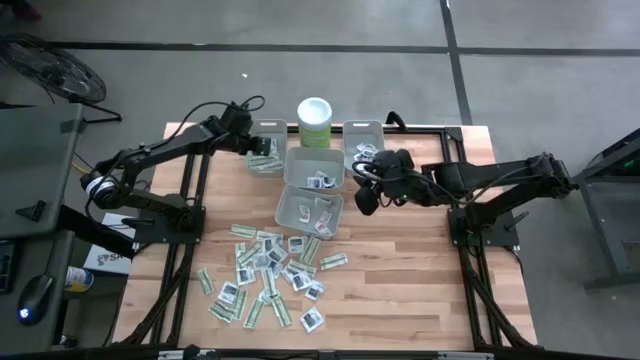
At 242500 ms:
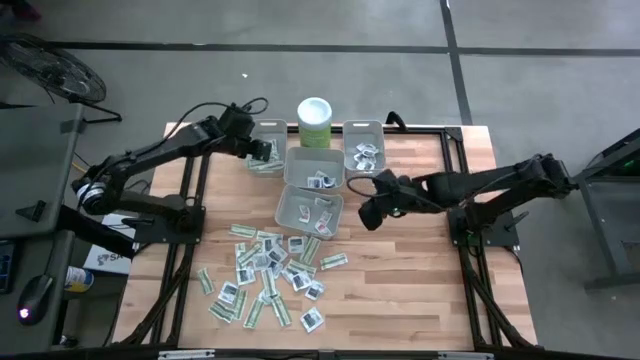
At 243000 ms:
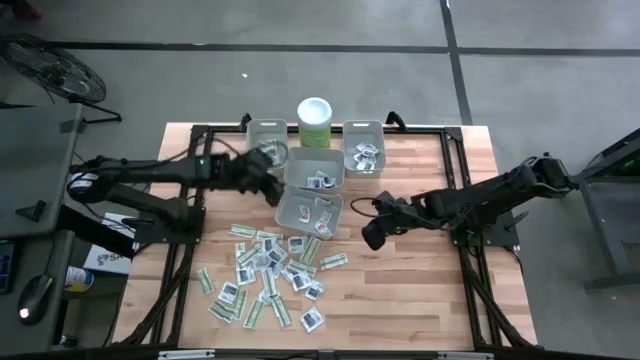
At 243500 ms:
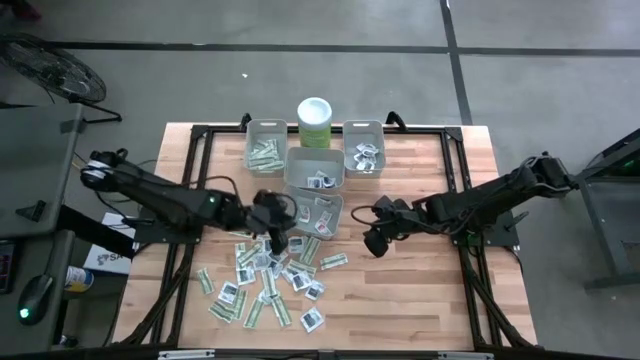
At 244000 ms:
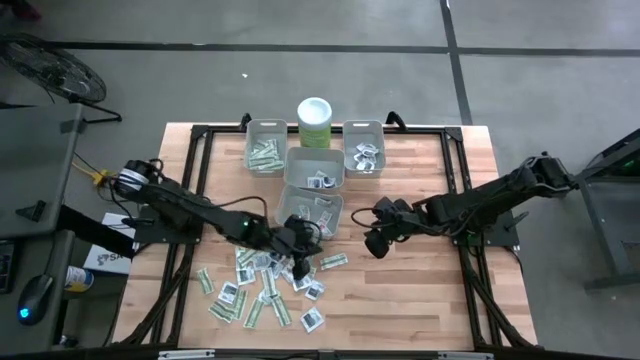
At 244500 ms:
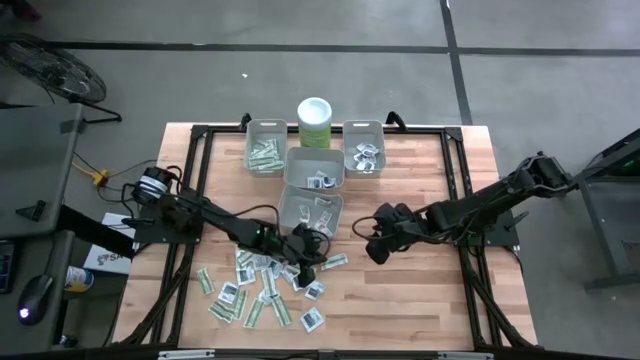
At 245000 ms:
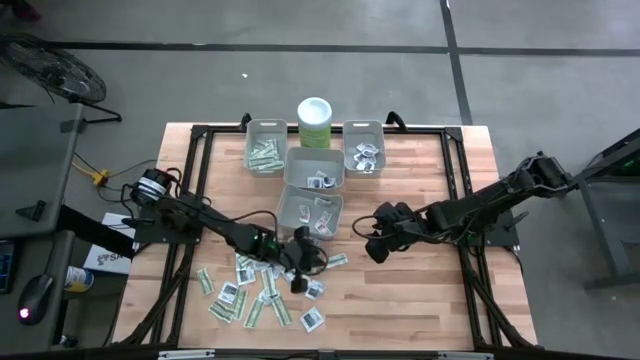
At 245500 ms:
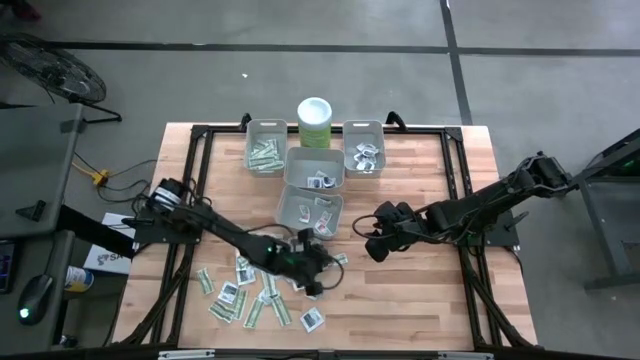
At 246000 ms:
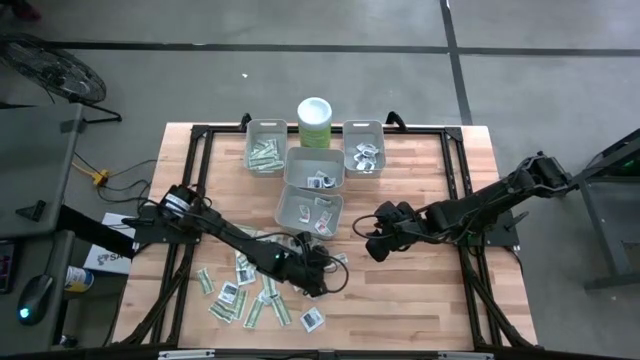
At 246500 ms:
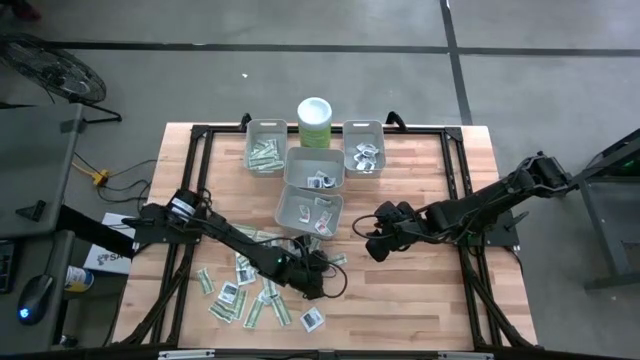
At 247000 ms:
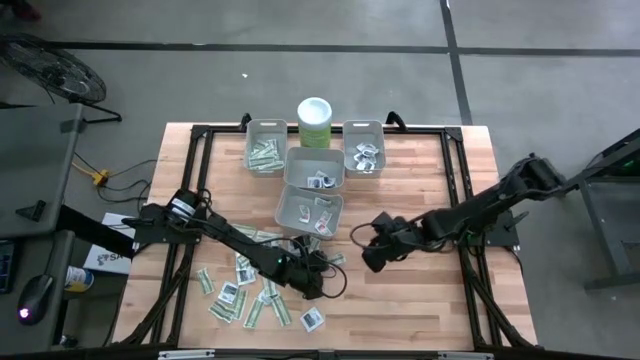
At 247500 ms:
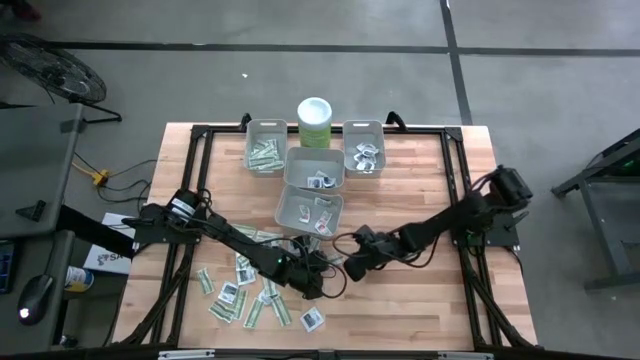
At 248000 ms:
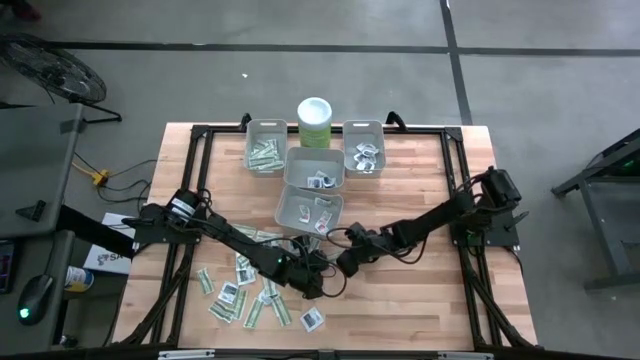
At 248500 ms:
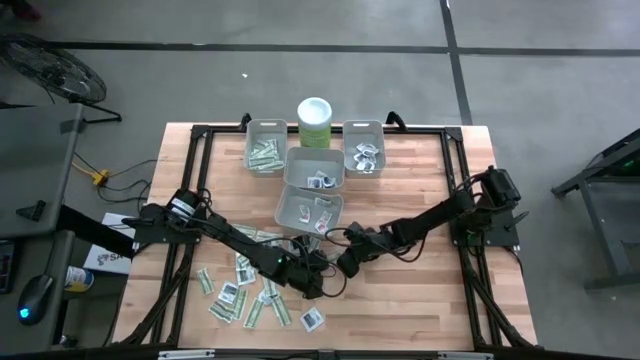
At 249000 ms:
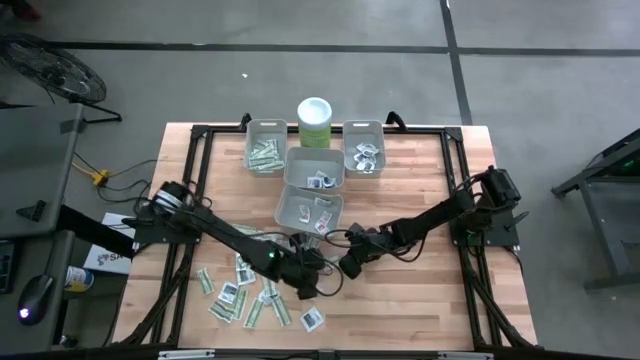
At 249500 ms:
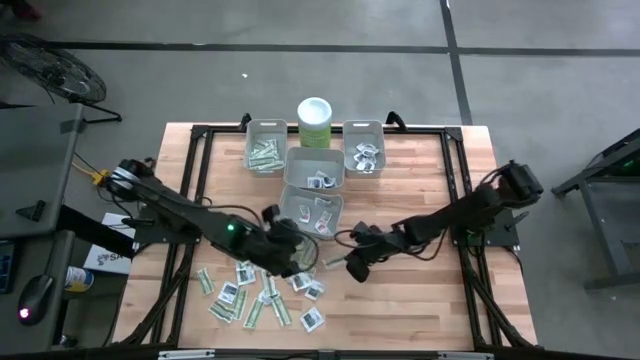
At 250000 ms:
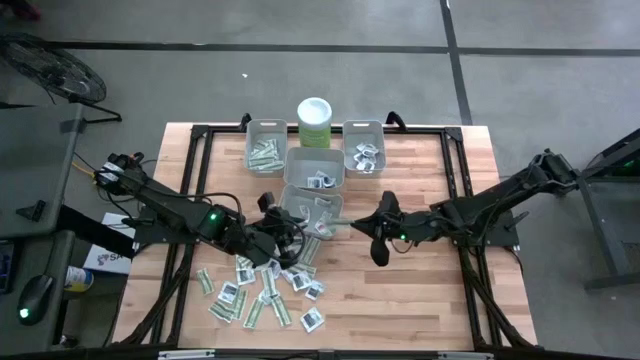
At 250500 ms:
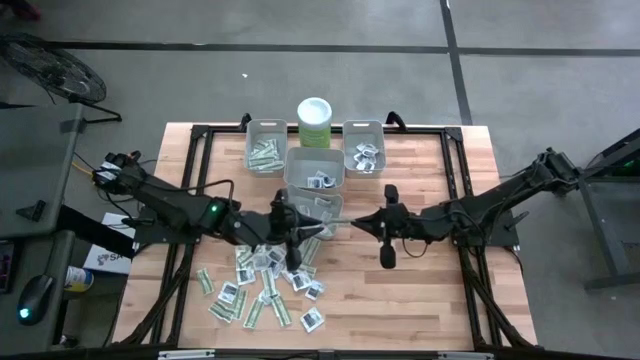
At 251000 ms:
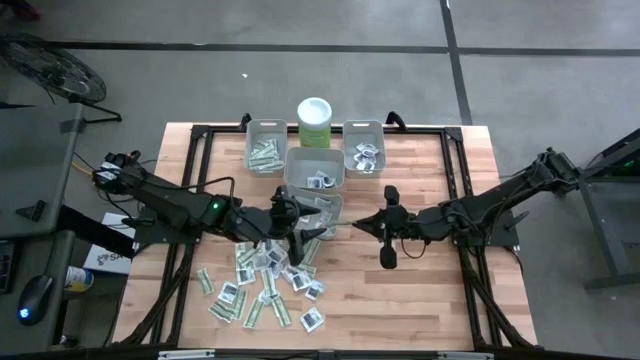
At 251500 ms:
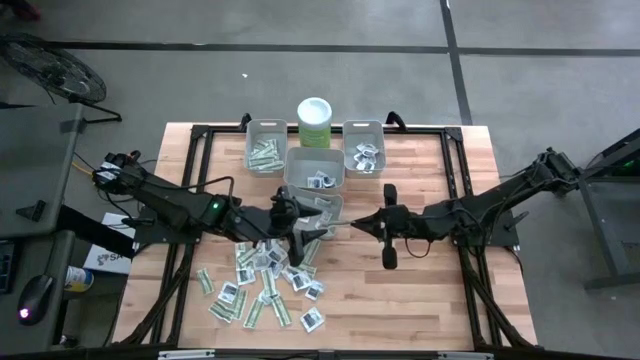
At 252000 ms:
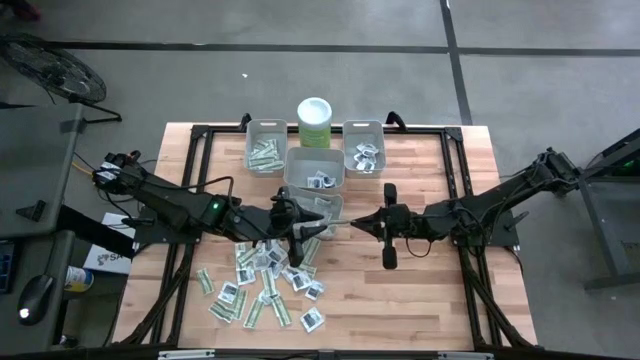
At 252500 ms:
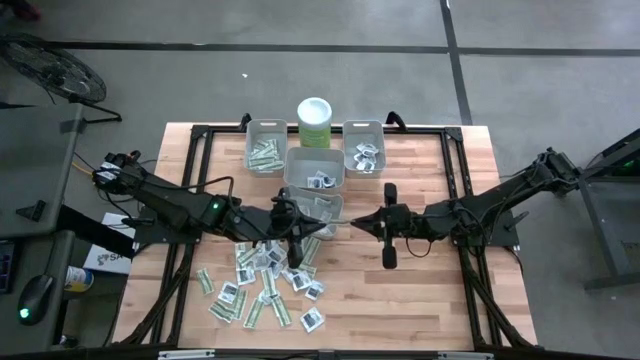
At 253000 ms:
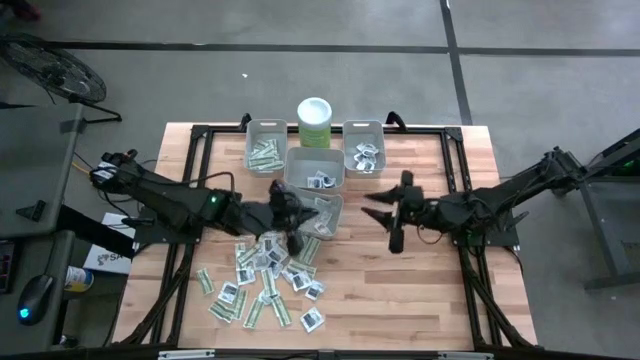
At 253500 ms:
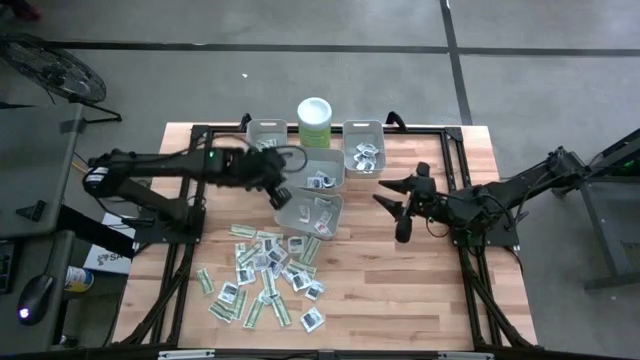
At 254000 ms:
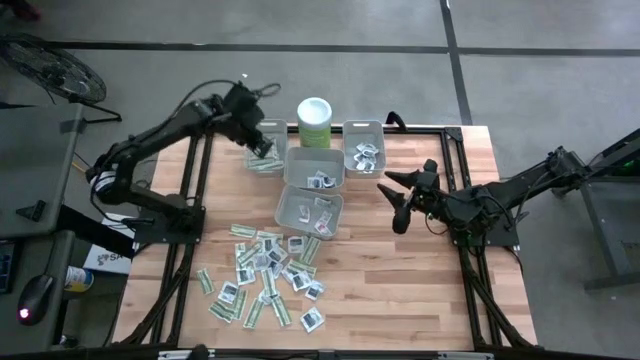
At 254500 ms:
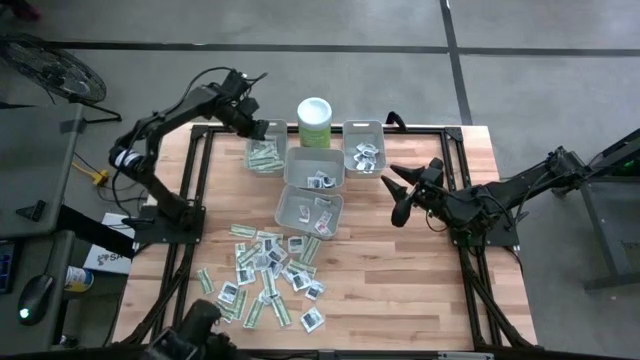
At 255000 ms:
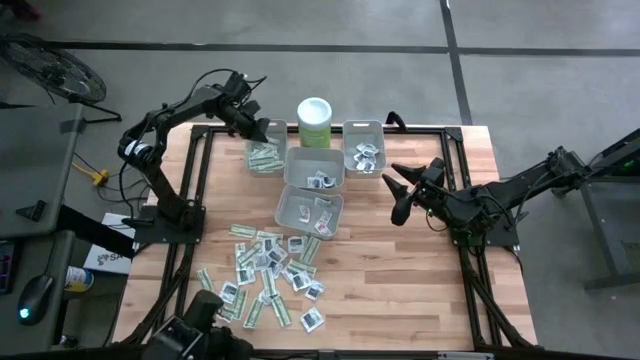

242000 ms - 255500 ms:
Task: Pick & Place First Aid Supplies
Put the bandage pack into the left bin

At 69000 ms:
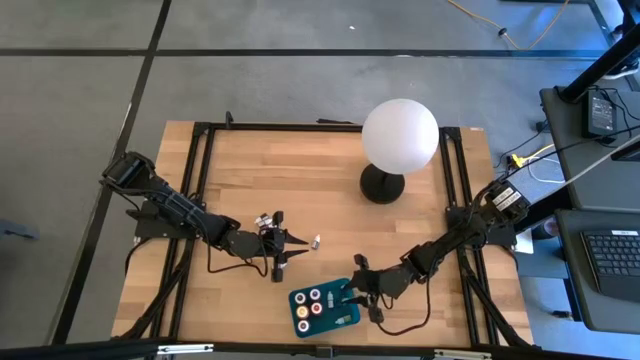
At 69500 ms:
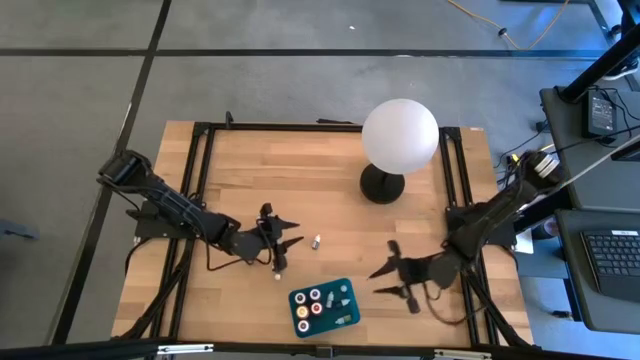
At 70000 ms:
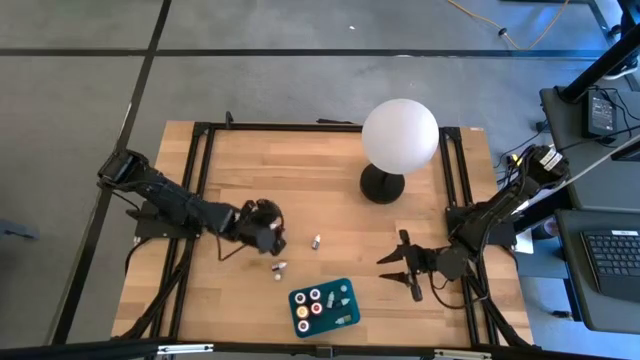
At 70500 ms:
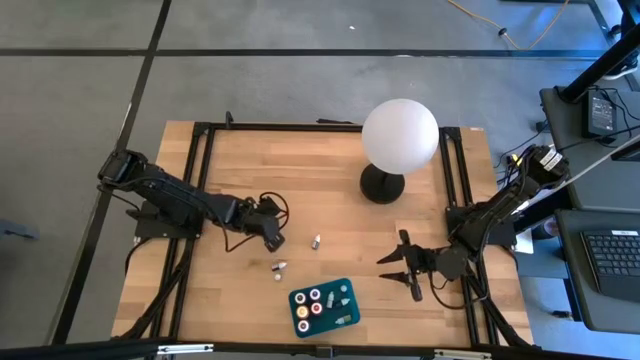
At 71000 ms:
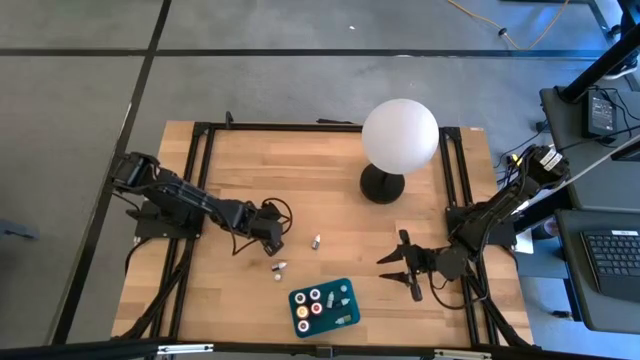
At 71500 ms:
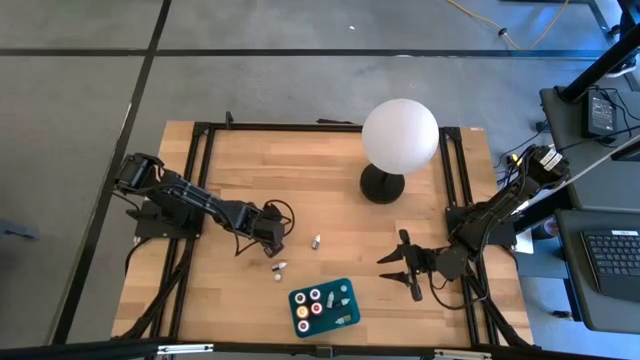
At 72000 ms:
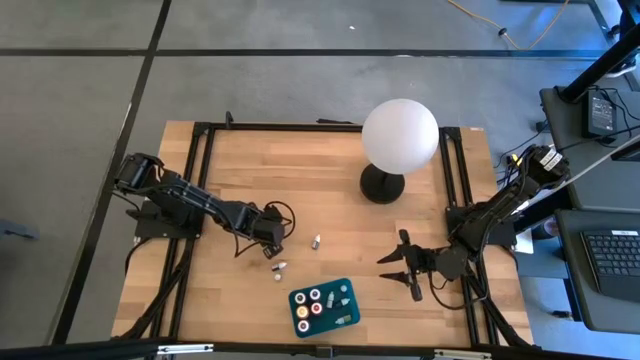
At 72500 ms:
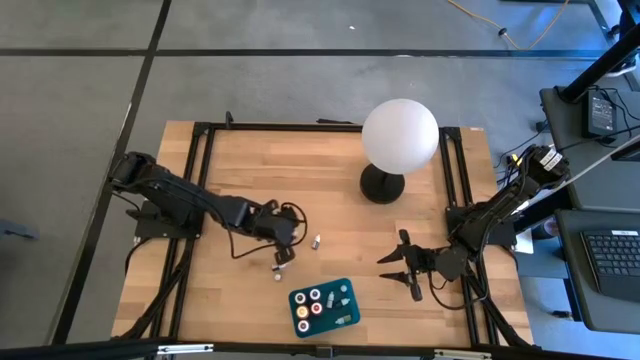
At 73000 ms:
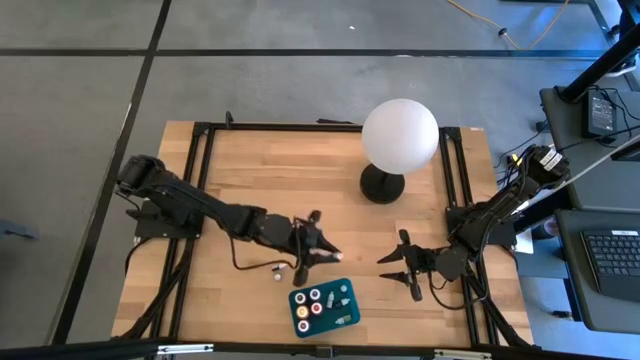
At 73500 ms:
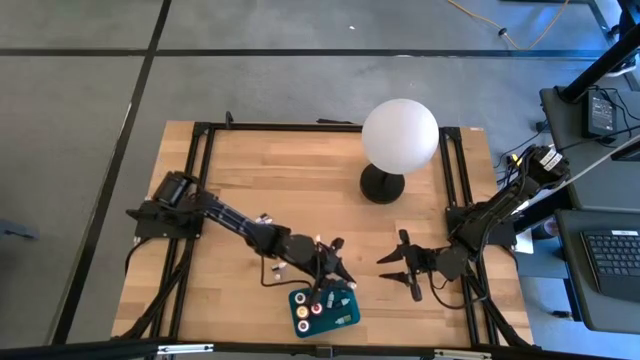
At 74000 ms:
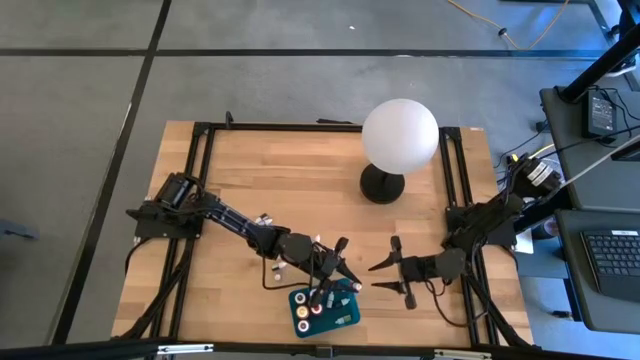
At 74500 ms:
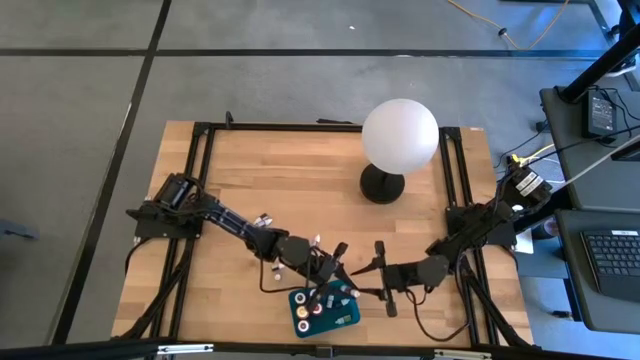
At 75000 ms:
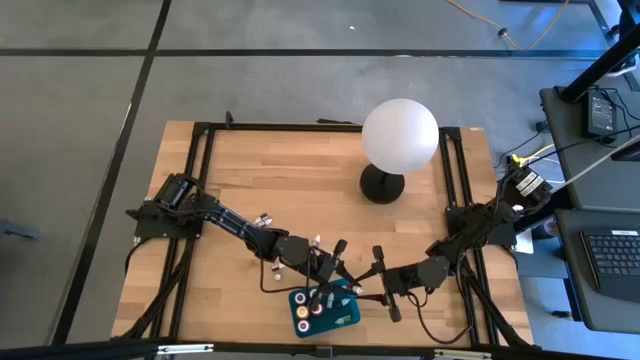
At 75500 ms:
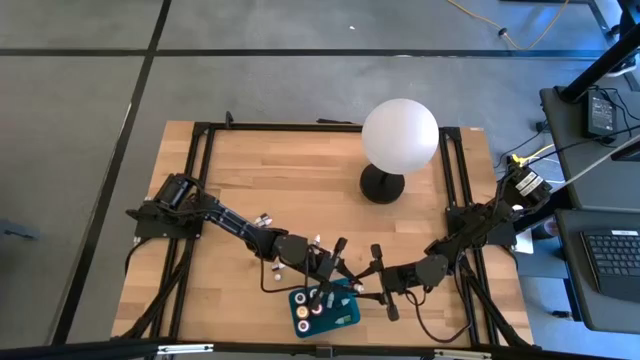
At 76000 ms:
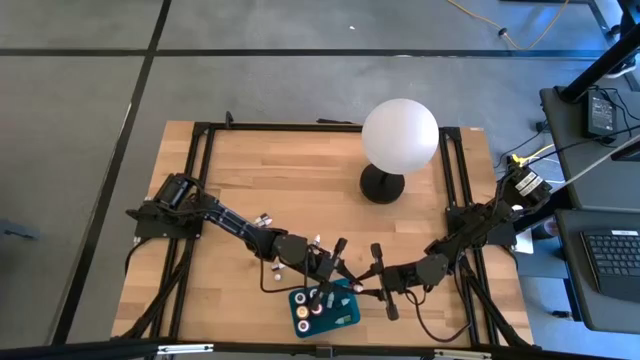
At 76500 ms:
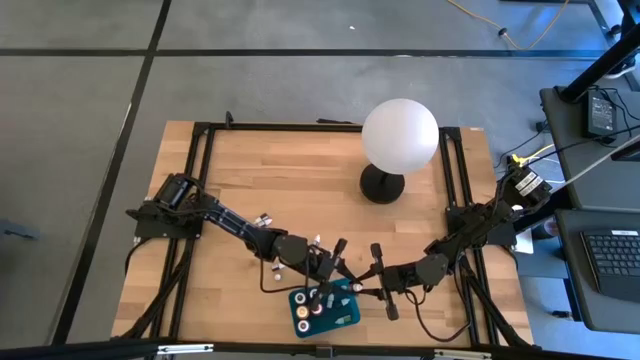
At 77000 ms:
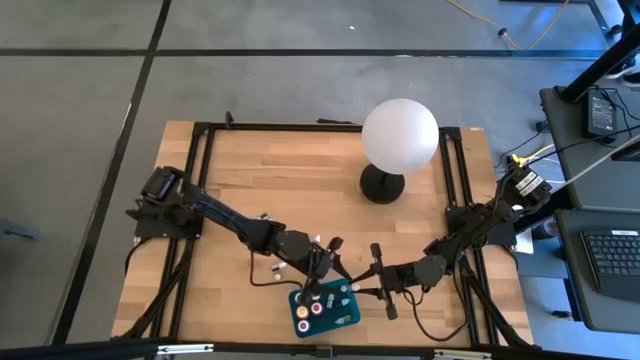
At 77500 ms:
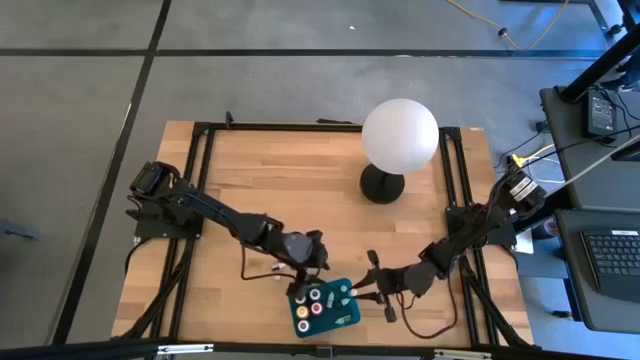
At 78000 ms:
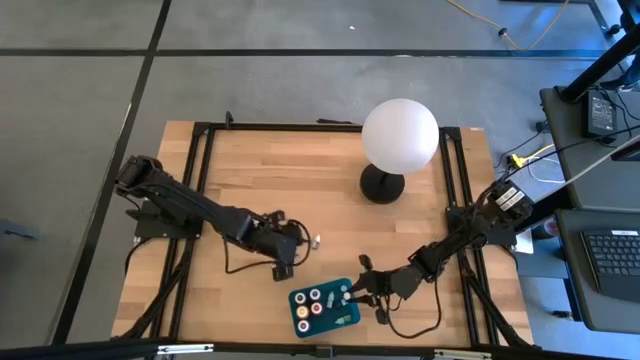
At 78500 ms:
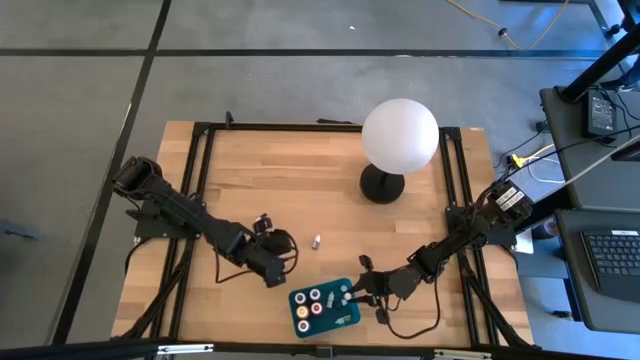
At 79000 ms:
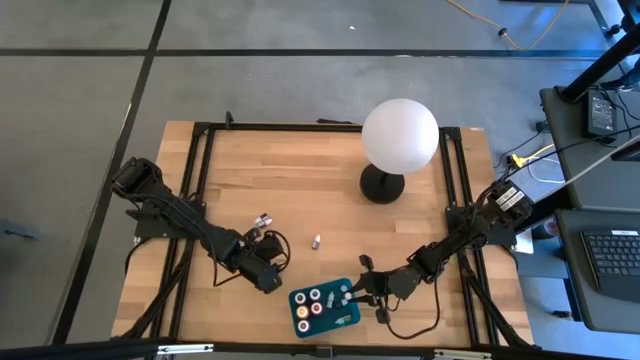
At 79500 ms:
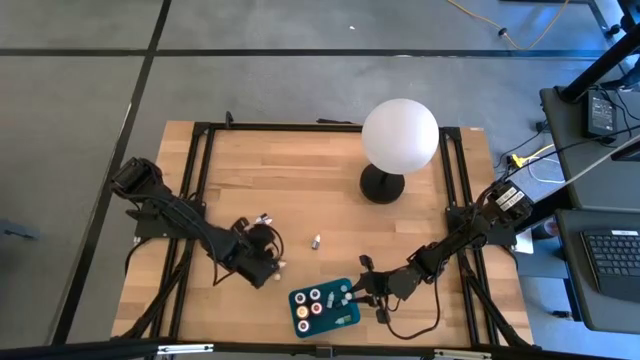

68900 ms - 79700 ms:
Task: Pick & Place food coloring
Put the small pink food coloring bottle into the blue bin
